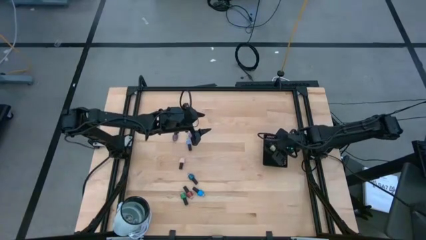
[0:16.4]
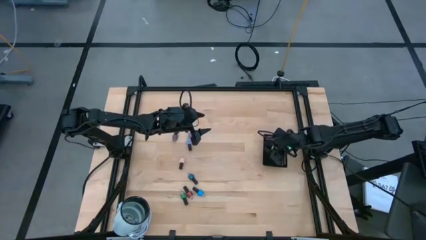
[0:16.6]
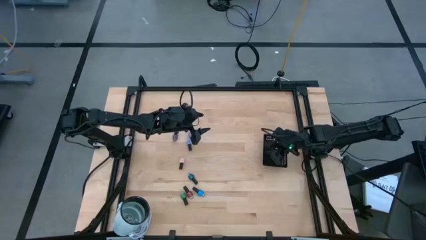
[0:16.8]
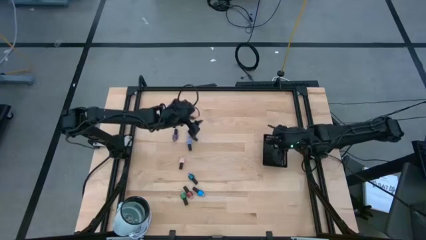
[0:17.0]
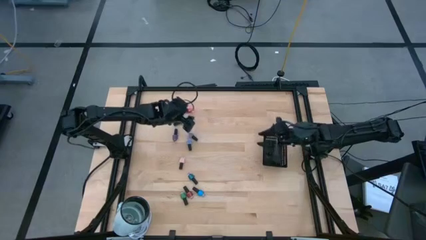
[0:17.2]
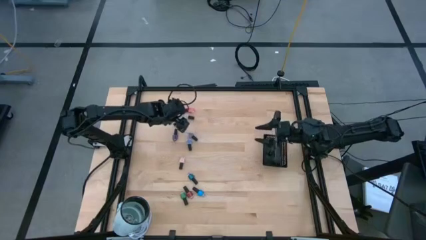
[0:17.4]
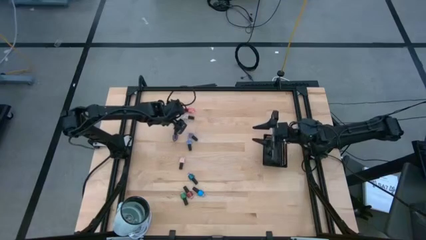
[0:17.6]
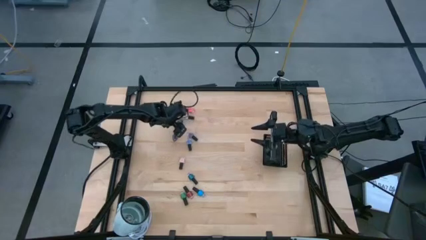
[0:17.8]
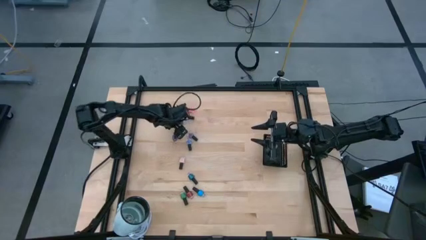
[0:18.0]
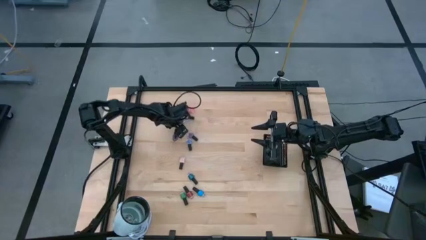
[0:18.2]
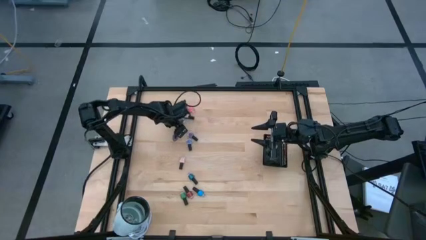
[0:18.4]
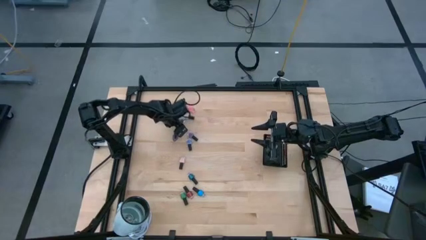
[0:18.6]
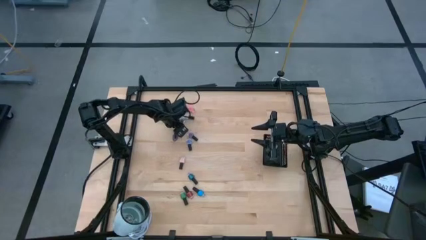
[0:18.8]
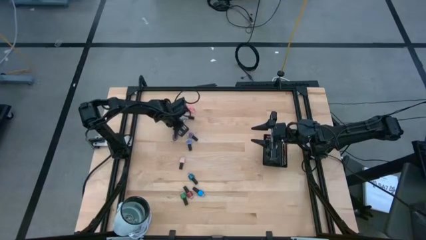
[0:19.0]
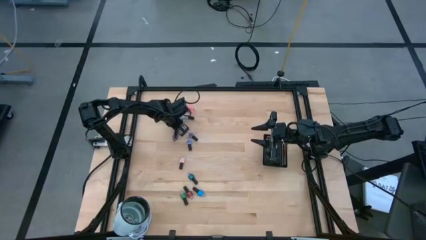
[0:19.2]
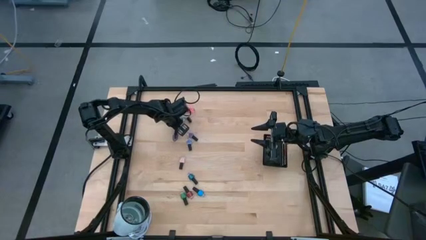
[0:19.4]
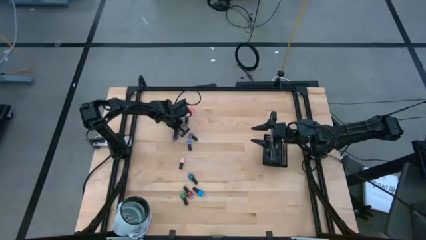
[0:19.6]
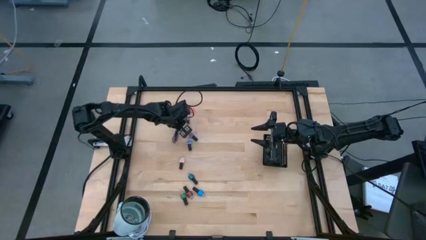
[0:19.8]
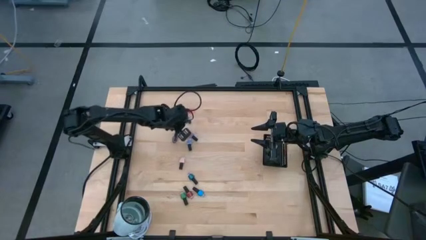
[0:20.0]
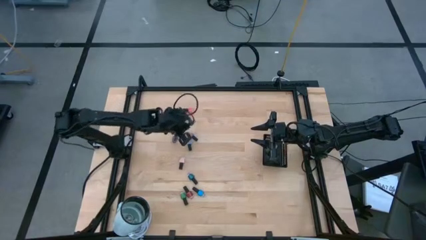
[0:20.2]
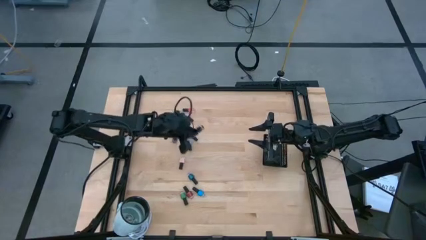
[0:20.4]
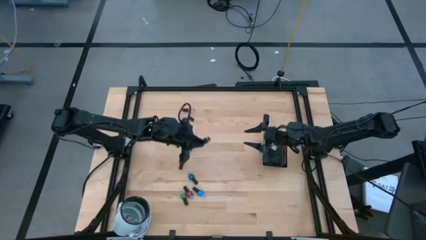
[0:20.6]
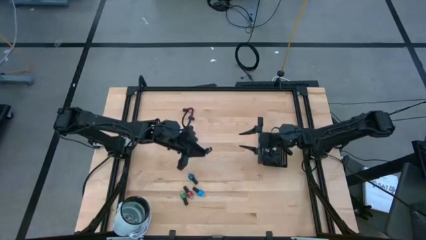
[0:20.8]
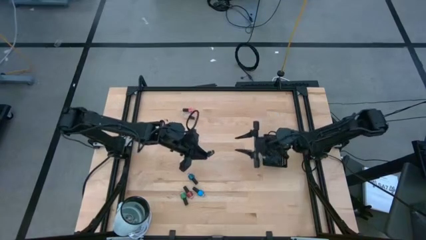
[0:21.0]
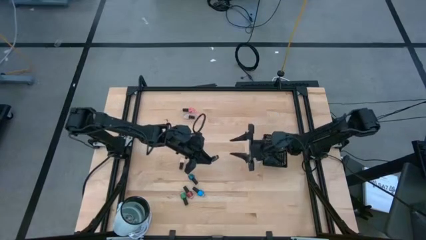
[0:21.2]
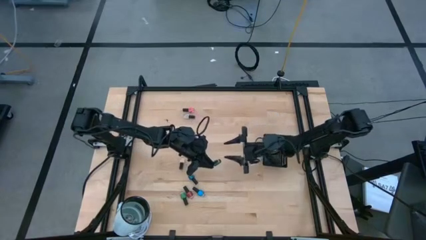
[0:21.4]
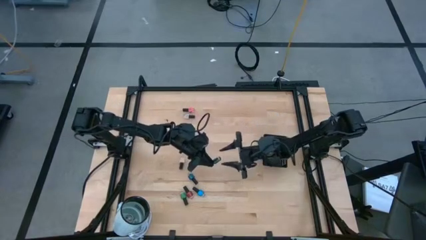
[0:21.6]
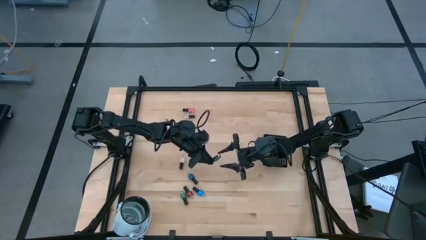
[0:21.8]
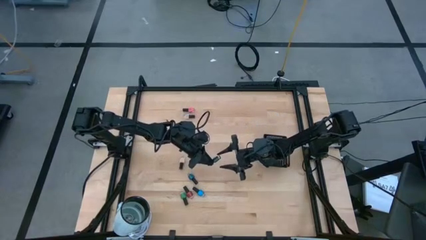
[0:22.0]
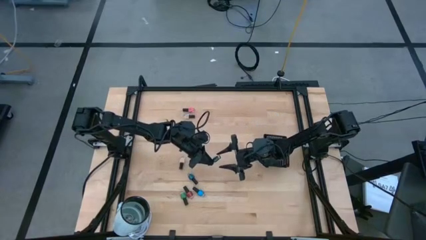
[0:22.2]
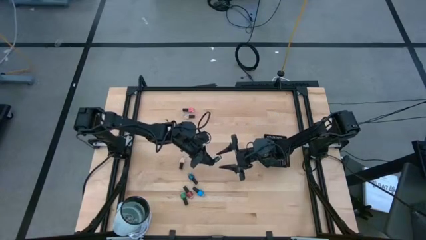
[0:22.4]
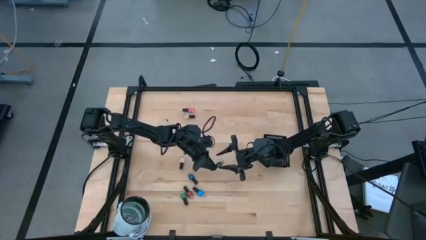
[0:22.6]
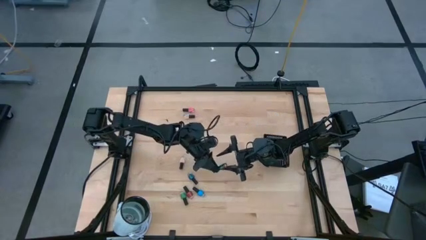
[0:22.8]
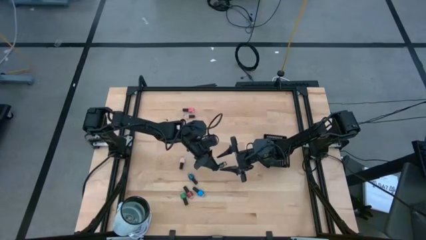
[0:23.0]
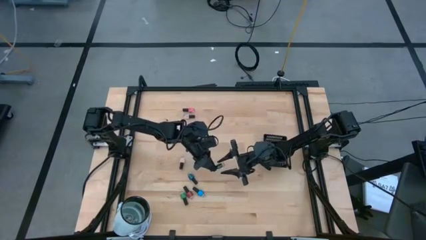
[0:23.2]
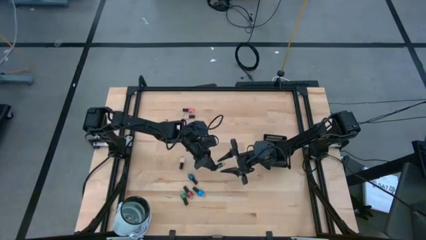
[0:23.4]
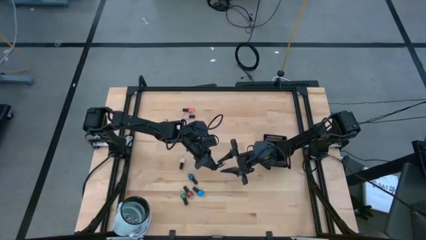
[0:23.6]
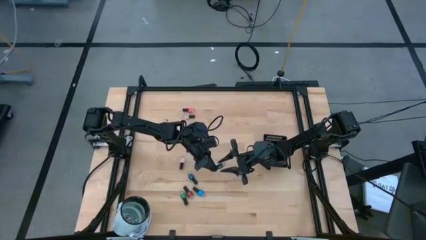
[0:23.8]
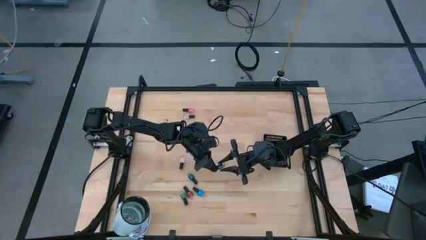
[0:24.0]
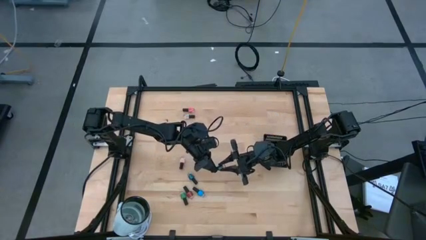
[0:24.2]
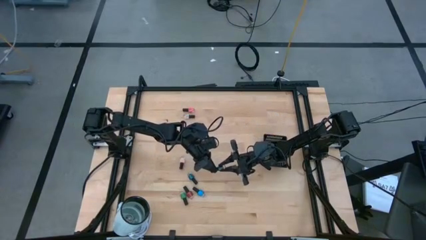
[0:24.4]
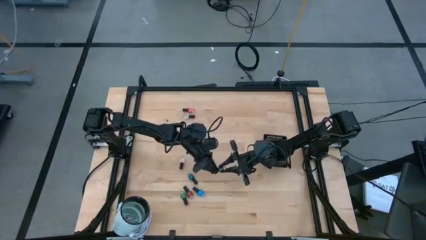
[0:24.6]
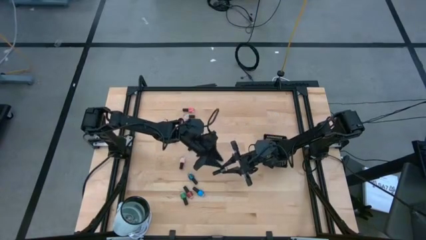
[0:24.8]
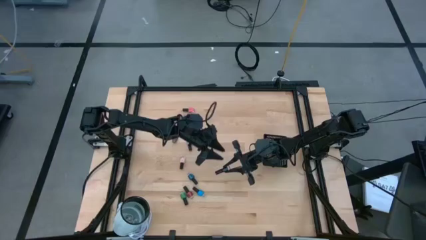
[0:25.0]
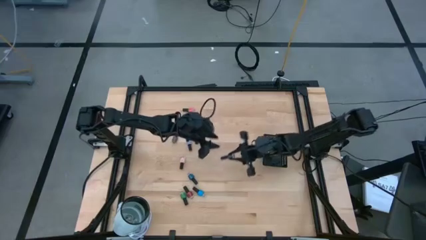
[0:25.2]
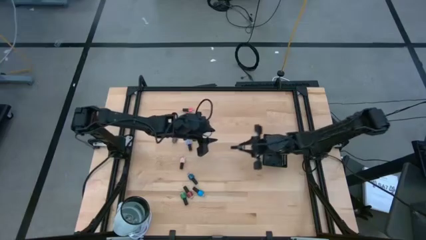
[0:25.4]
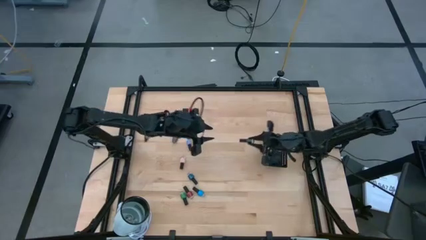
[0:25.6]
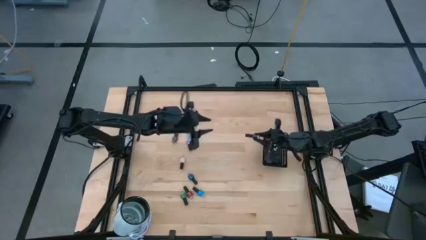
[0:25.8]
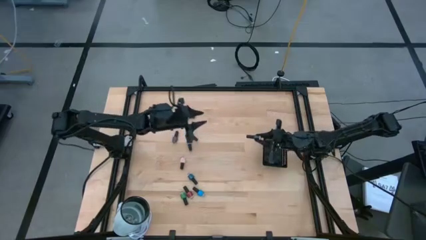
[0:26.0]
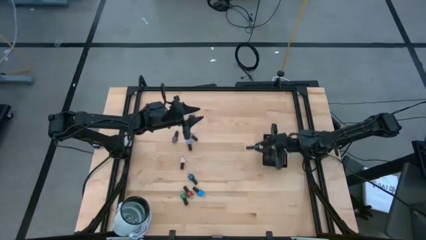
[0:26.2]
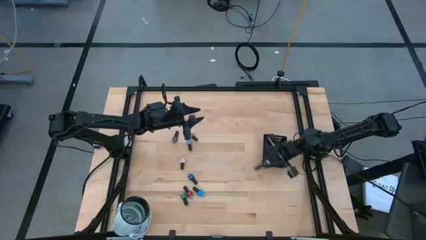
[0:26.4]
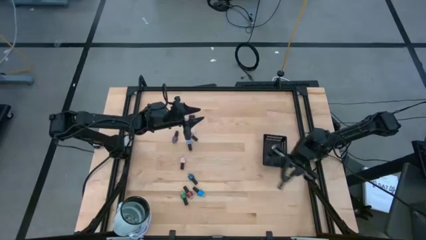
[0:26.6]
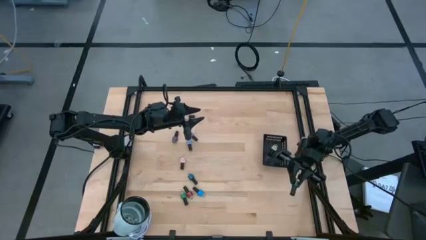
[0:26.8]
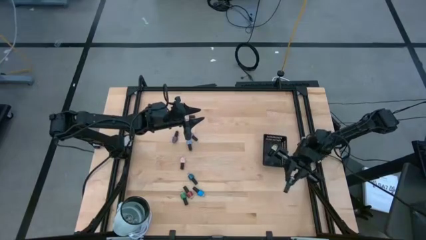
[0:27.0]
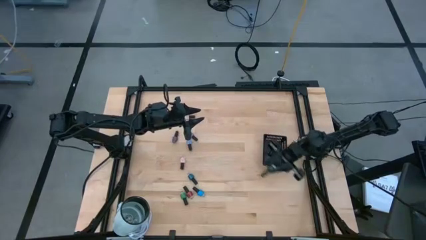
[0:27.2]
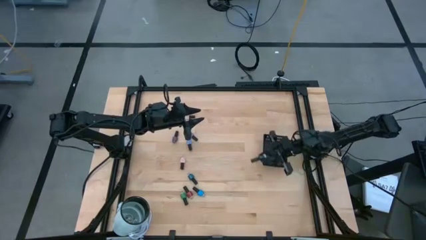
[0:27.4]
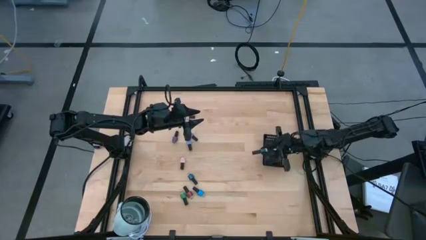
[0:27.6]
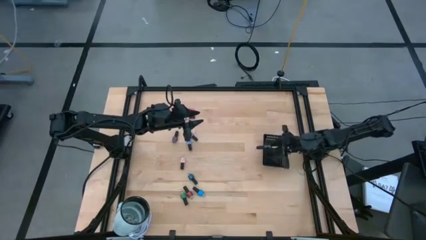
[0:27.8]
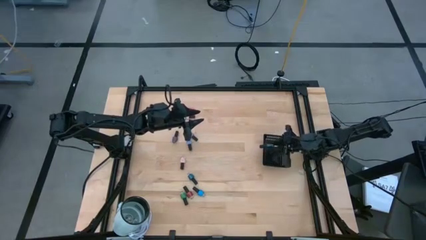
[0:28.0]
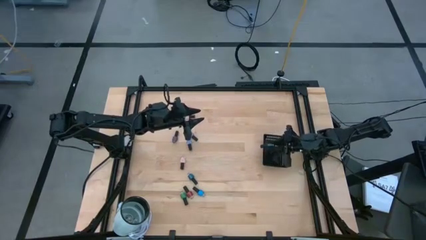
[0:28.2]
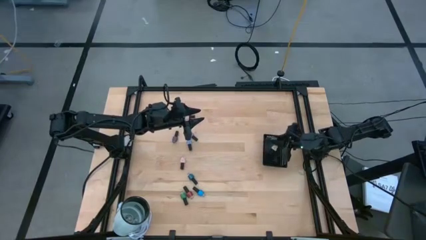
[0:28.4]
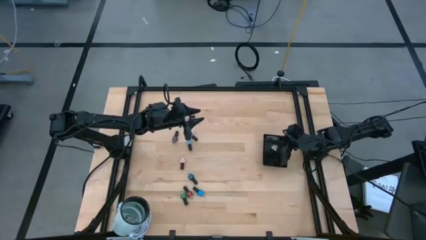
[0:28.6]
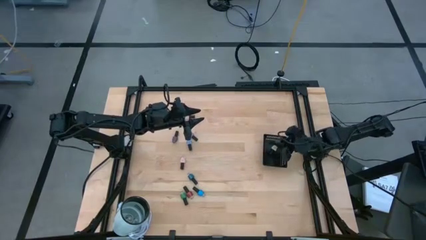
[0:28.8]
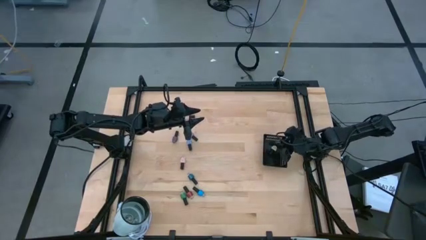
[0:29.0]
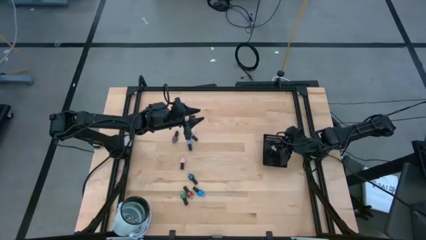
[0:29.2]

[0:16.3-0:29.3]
Task: Pick & Place Nail Polish
Put the green nail polish into the black basket
